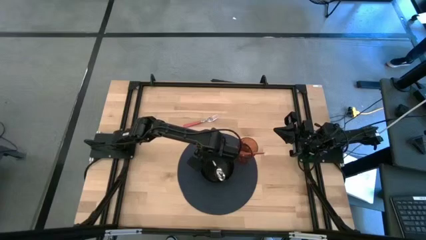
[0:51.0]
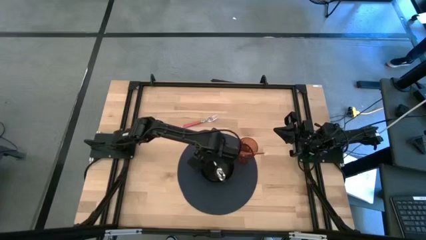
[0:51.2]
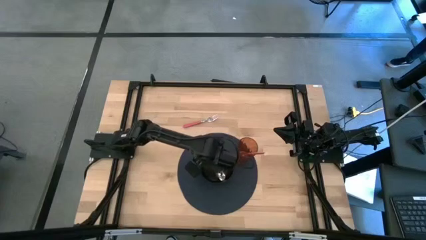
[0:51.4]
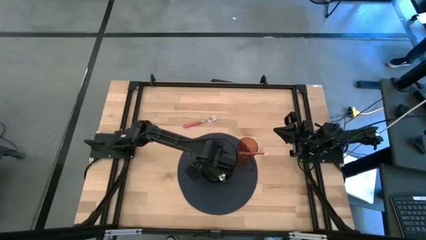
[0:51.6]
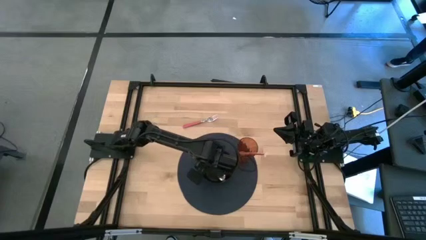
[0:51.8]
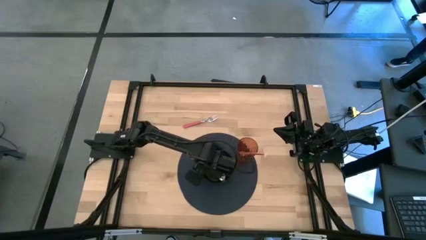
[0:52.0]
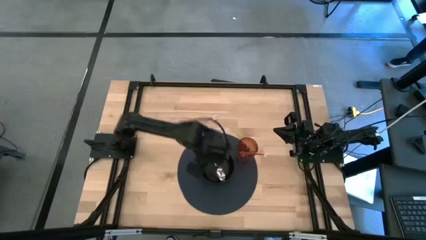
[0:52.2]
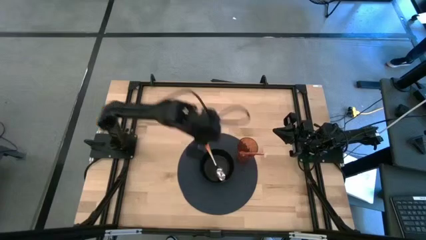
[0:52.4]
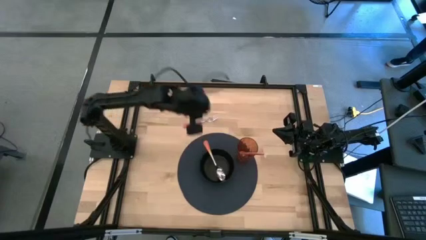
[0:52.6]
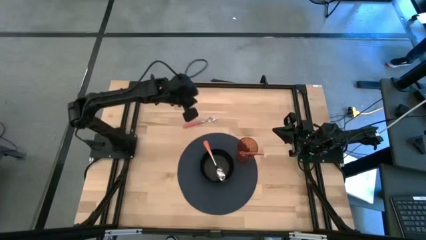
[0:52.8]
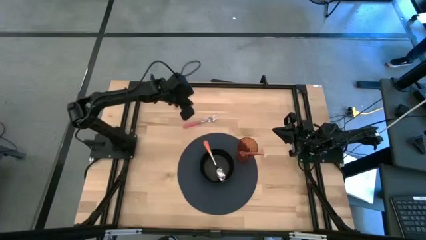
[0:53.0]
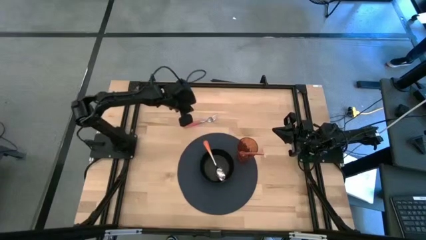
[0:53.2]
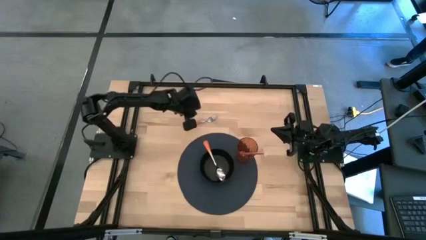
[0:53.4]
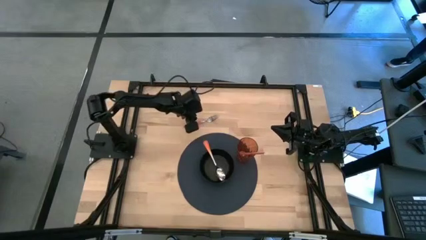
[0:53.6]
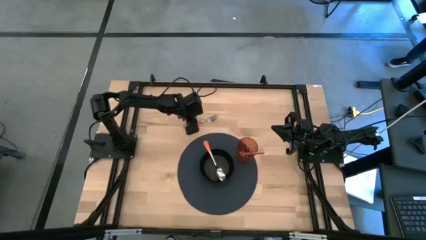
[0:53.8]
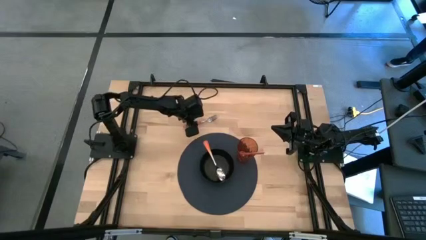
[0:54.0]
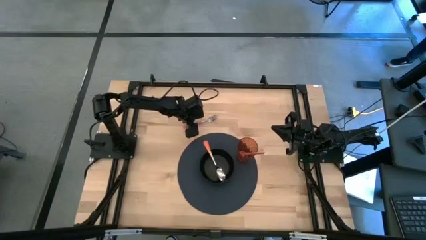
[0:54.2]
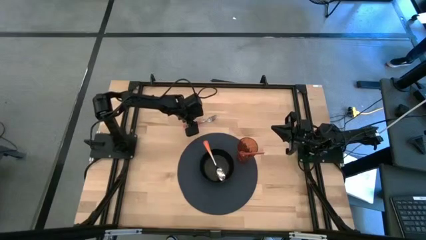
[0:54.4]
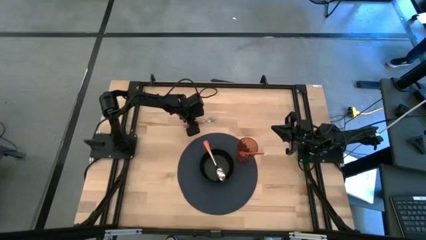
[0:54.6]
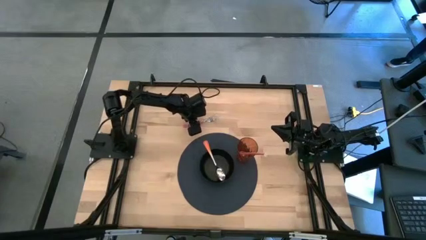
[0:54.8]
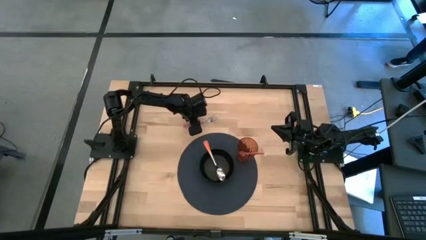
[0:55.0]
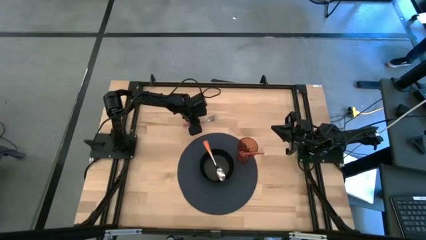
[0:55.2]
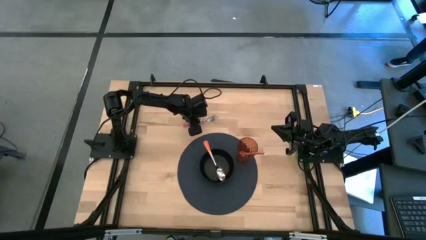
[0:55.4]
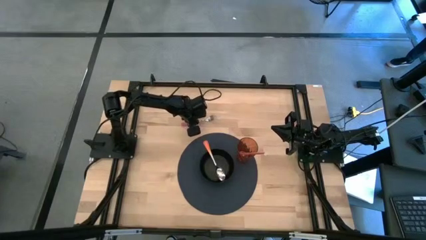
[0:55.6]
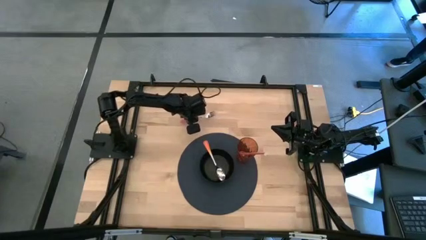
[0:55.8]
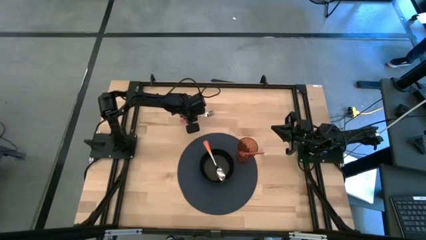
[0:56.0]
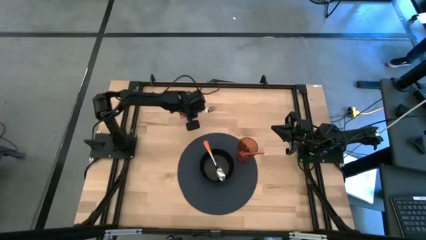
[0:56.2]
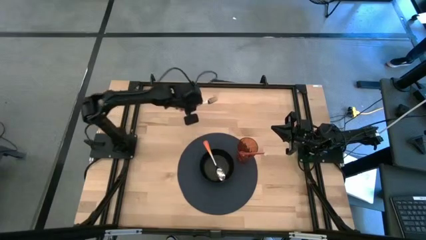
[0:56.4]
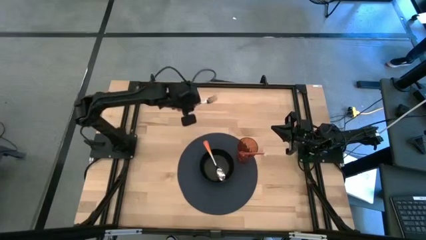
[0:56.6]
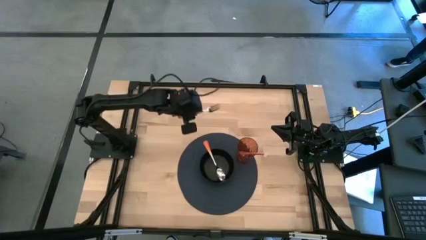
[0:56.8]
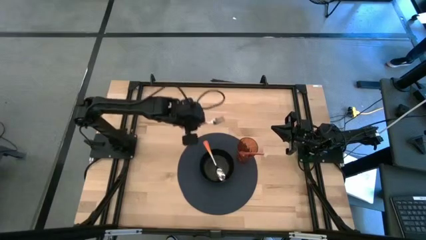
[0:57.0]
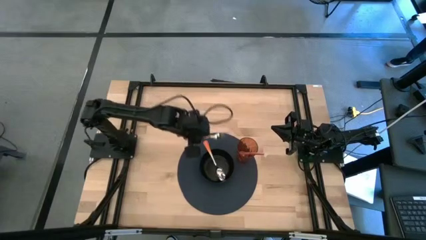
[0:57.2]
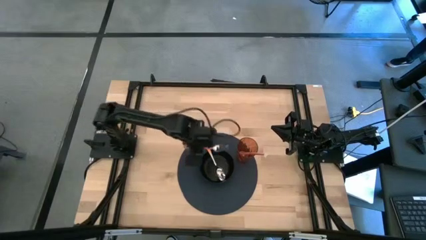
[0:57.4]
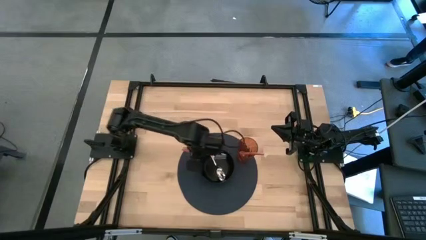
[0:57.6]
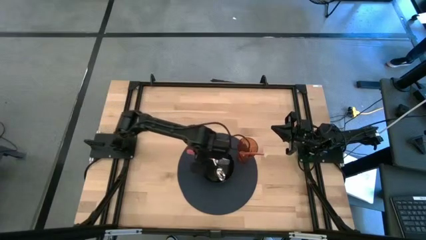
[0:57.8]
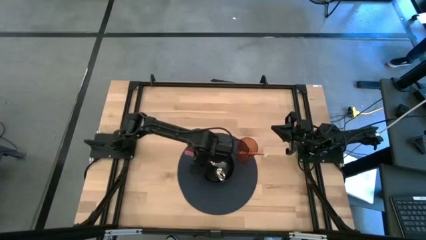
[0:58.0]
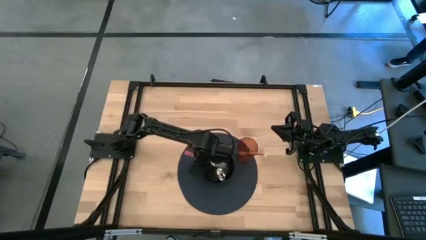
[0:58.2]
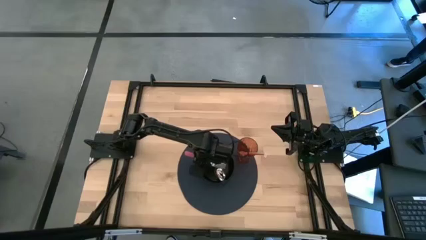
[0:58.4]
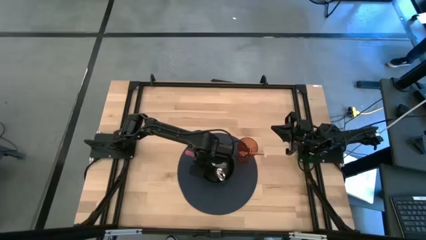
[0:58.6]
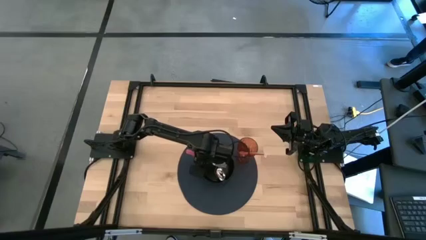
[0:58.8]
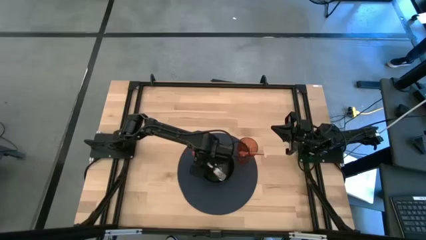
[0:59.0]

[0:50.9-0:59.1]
Task: Pick & Place Utensil
Put the pink fork into the black bowl on the dark blue mat

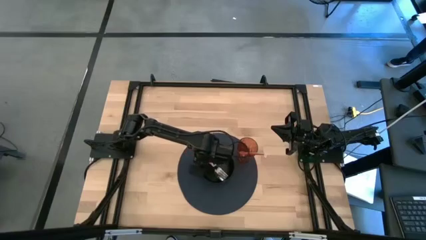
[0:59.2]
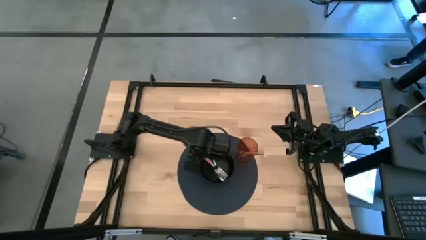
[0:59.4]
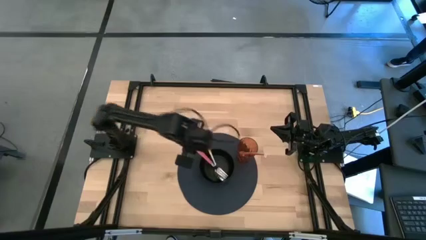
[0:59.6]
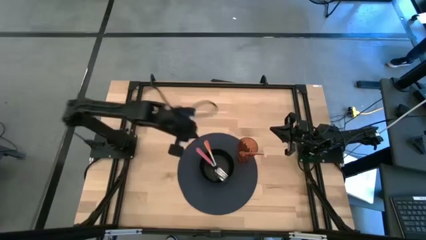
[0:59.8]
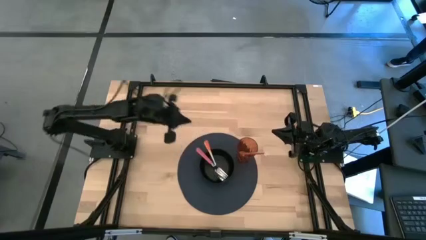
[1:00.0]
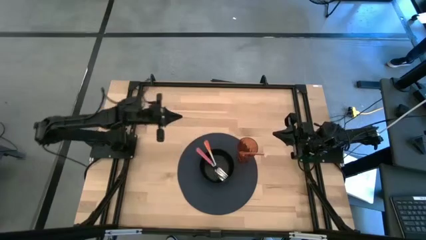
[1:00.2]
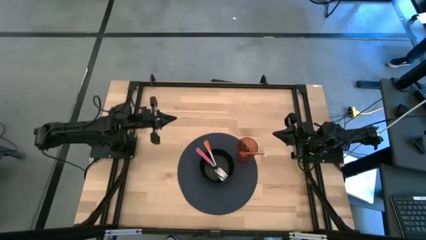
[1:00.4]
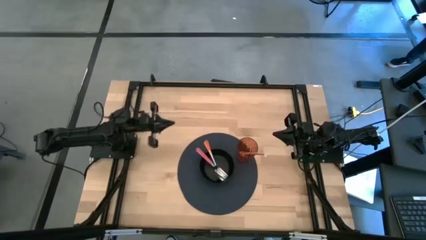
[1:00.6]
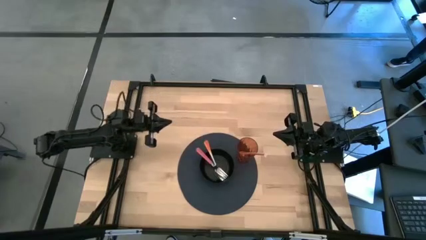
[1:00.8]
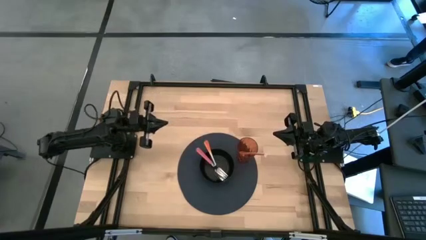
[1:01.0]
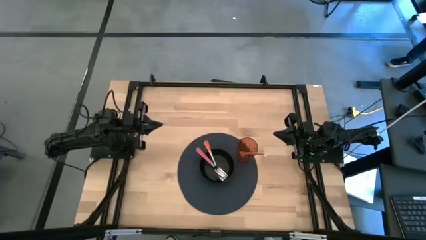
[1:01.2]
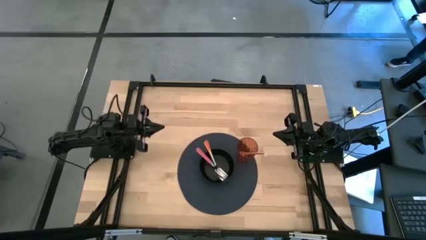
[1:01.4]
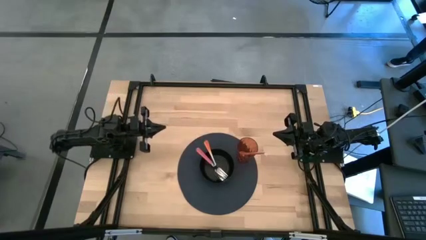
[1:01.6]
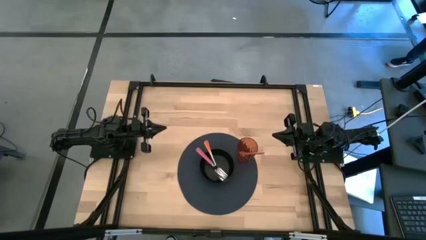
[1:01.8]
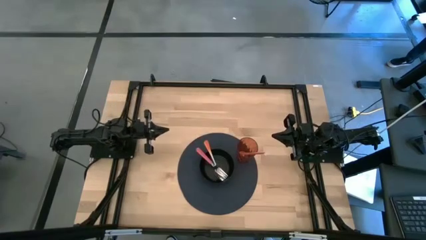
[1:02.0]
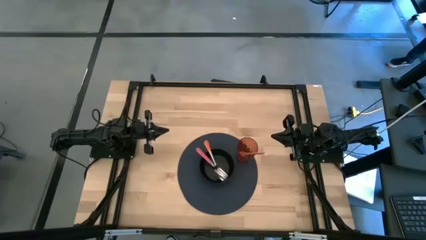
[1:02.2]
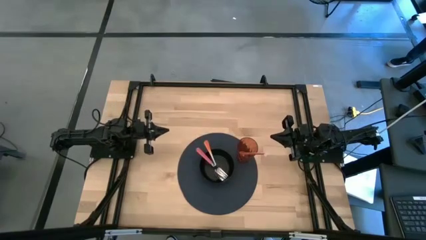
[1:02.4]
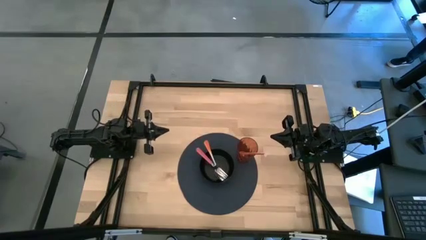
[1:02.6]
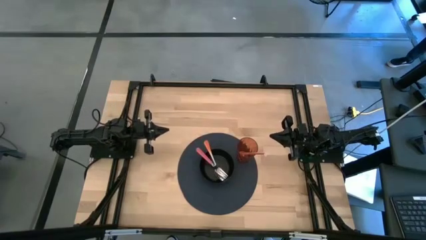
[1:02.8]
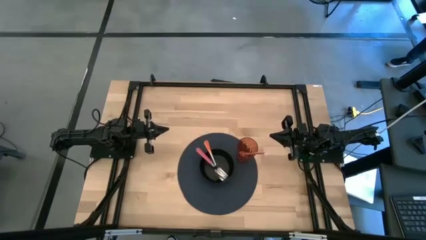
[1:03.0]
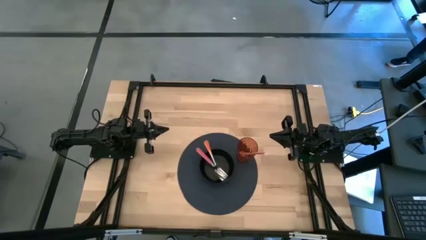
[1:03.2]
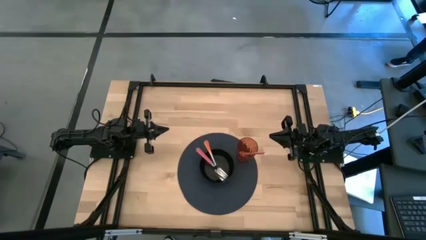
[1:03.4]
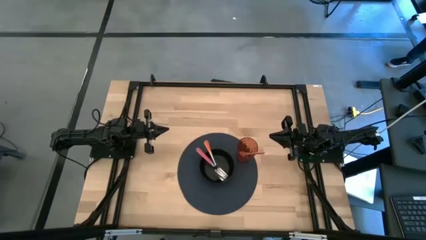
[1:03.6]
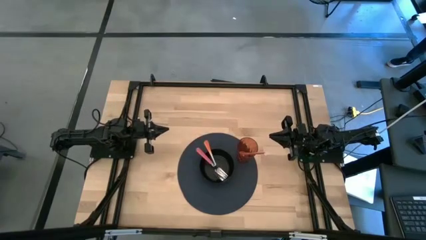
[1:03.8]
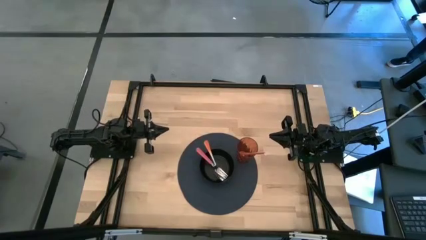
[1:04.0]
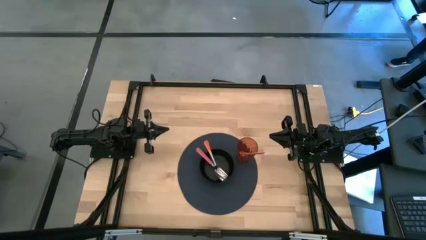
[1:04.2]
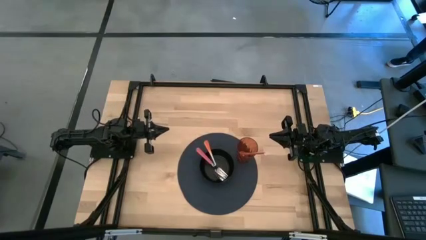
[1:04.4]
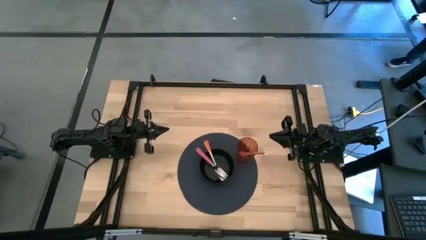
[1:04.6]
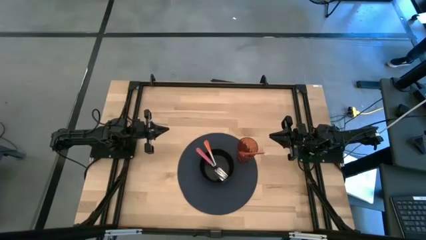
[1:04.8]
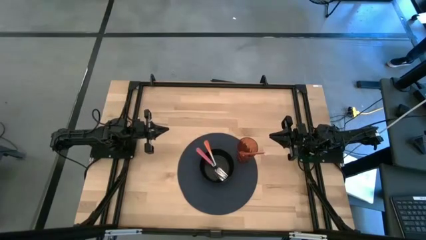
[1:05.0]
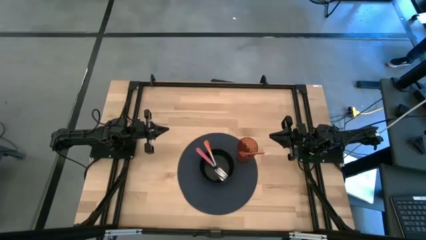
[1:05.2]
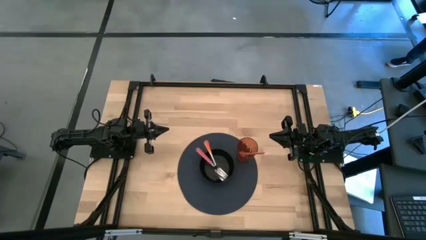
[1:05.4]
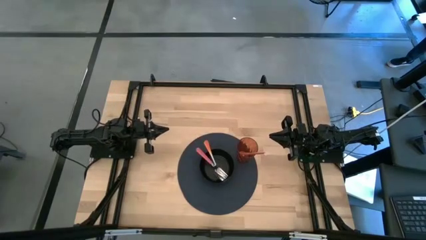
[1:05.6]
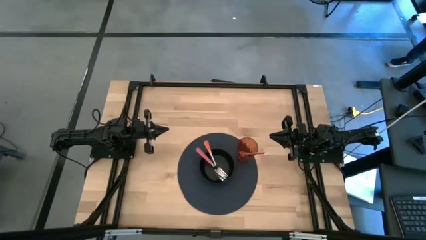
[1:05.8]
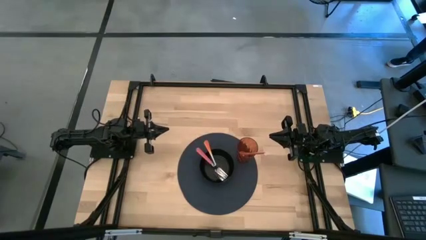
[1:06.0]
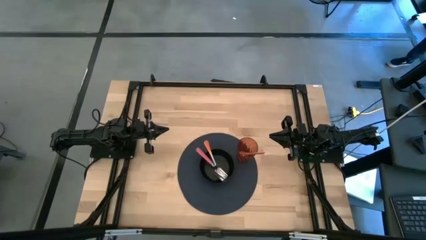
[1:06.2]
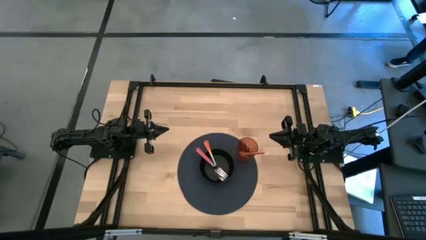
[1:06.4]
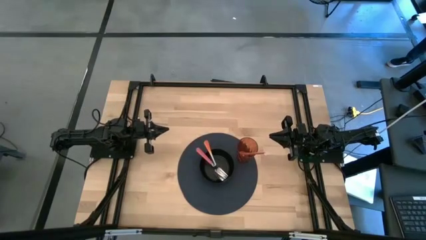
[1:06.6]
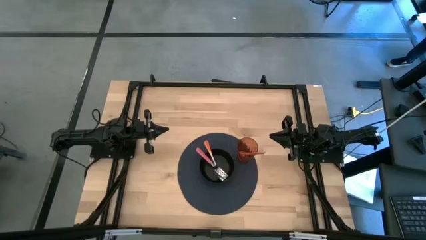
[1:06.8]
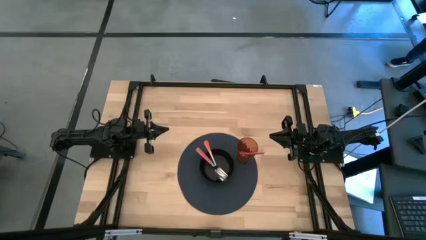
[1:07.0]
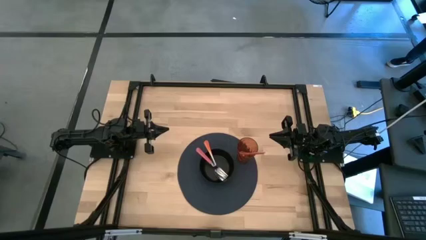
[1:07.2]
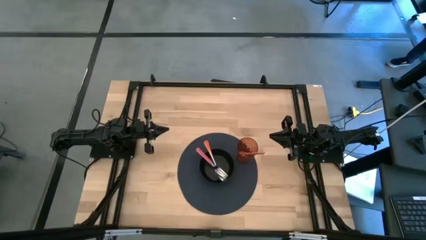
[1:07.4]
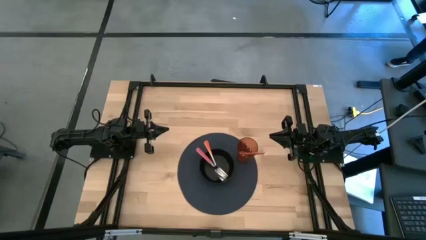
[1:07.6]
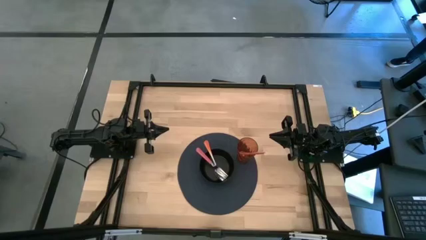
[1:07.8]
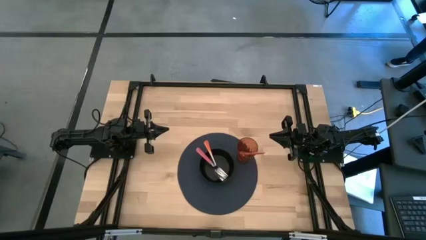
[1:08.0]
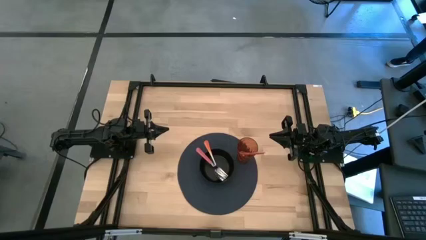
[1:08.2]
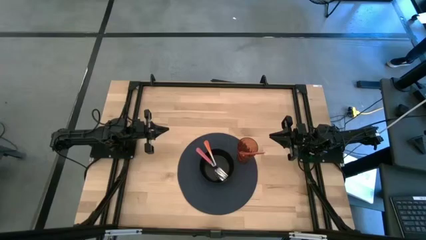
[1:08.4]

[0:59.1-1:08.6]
Return to Home Position
